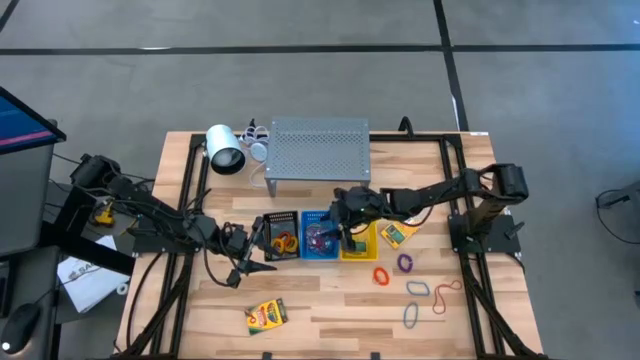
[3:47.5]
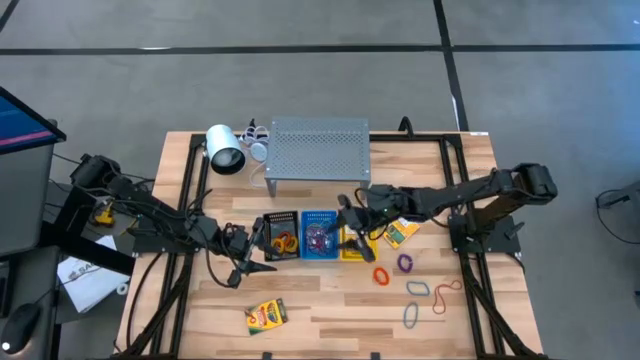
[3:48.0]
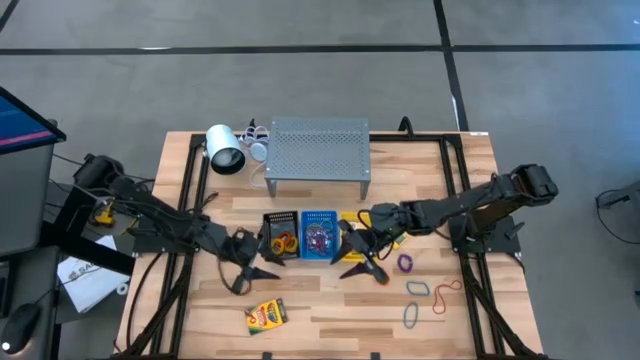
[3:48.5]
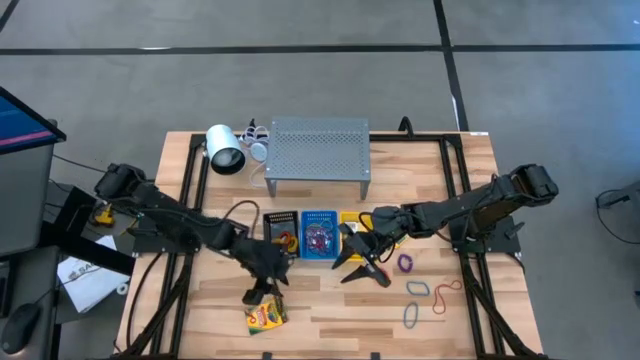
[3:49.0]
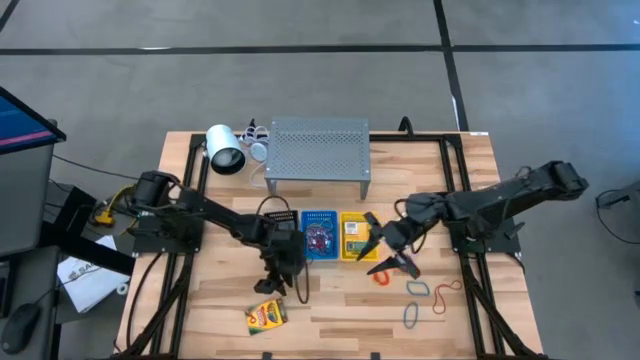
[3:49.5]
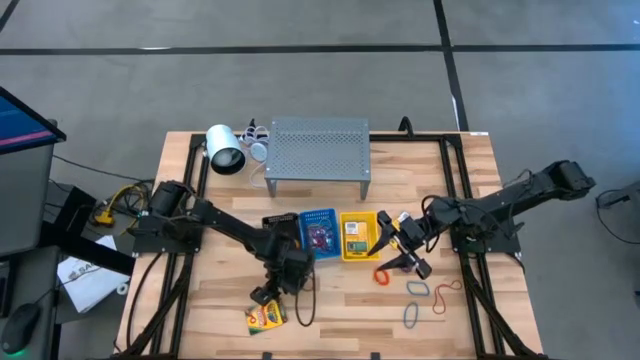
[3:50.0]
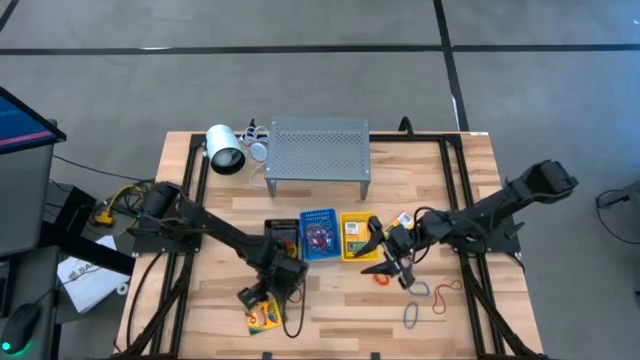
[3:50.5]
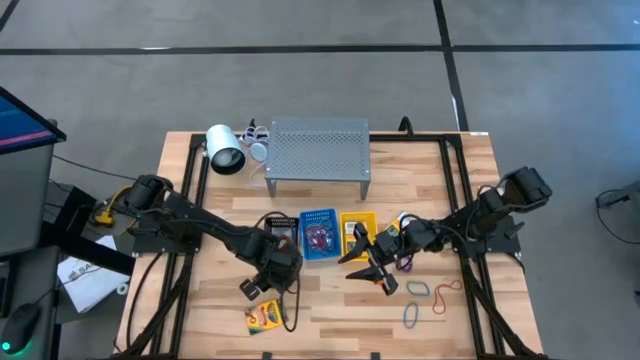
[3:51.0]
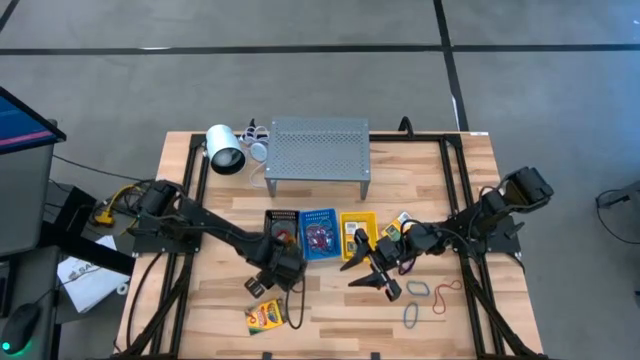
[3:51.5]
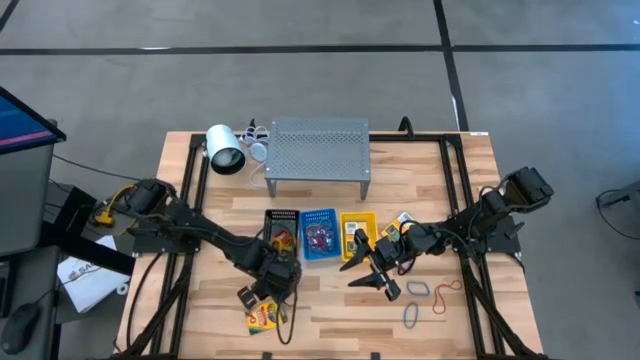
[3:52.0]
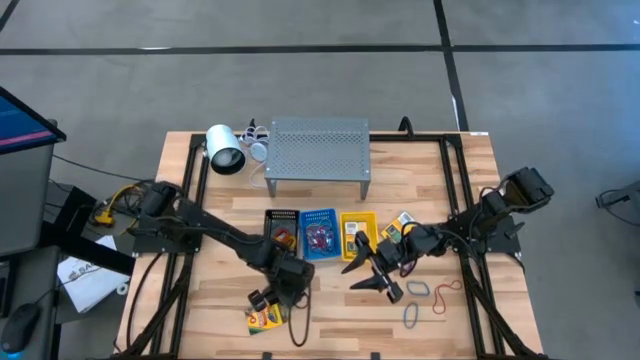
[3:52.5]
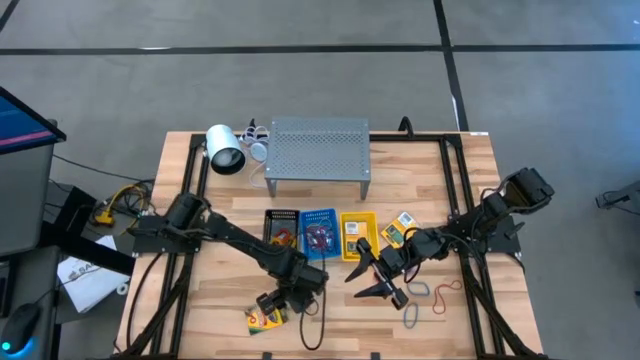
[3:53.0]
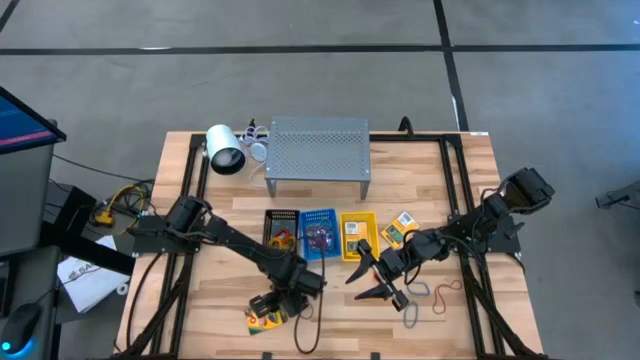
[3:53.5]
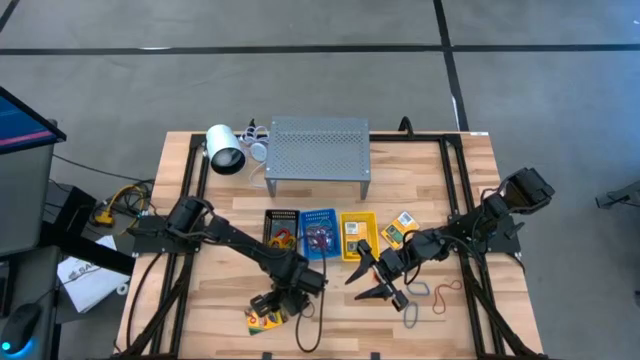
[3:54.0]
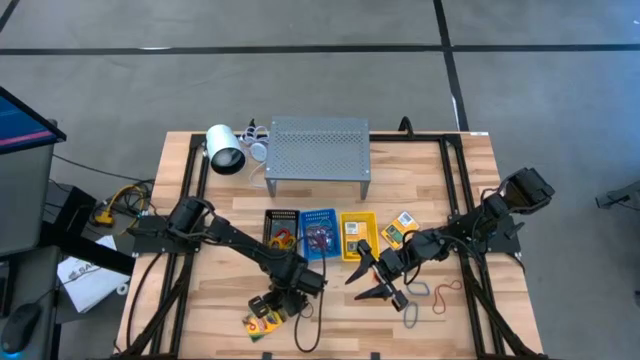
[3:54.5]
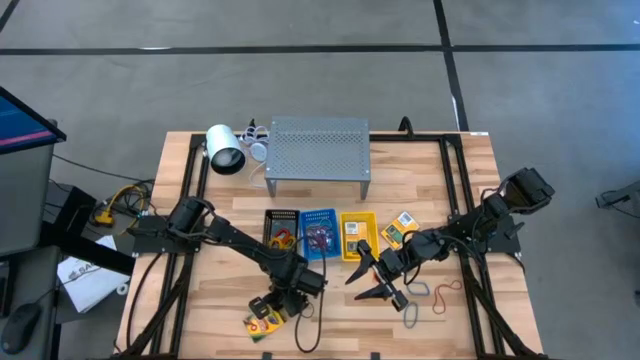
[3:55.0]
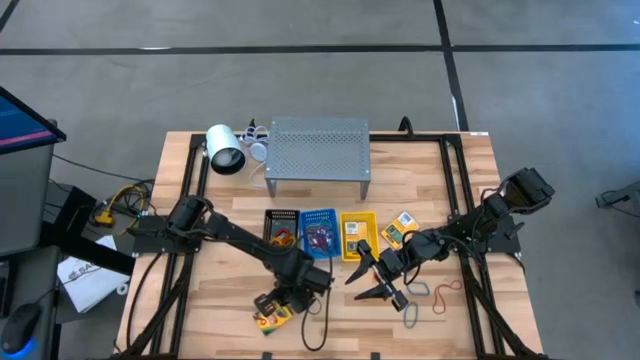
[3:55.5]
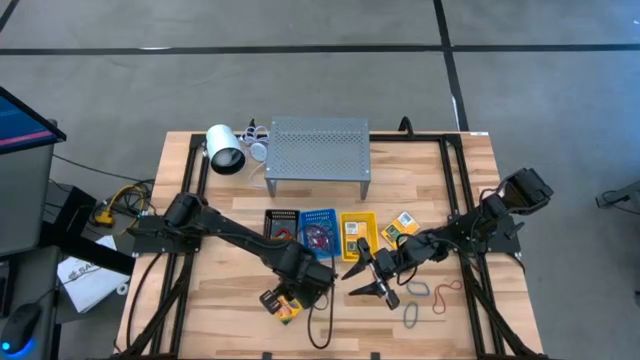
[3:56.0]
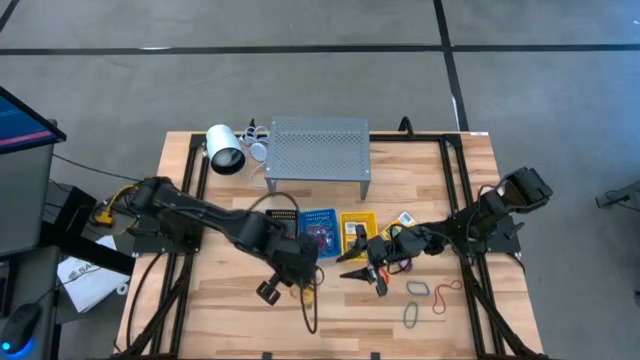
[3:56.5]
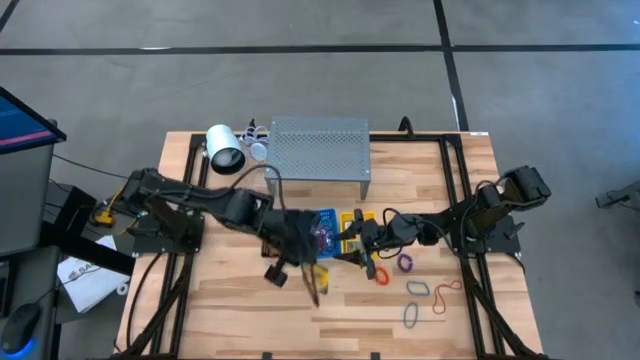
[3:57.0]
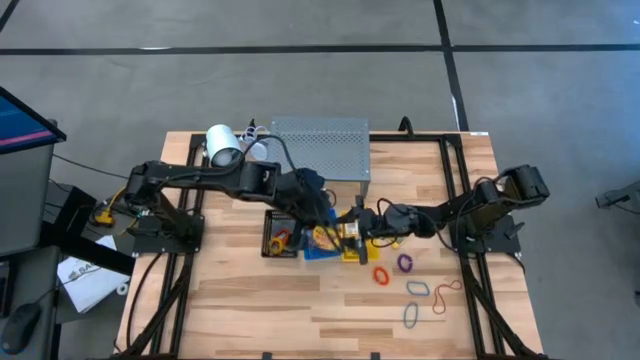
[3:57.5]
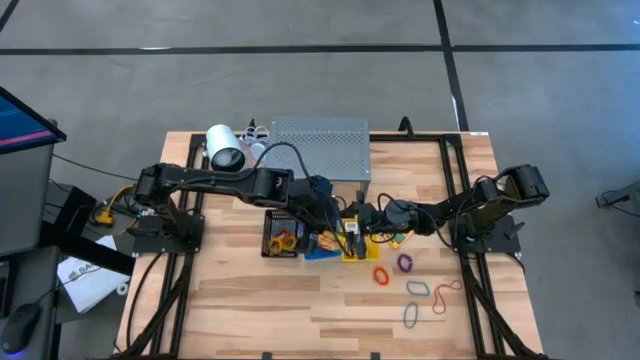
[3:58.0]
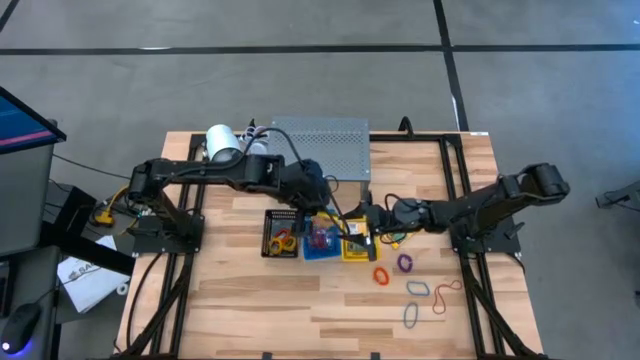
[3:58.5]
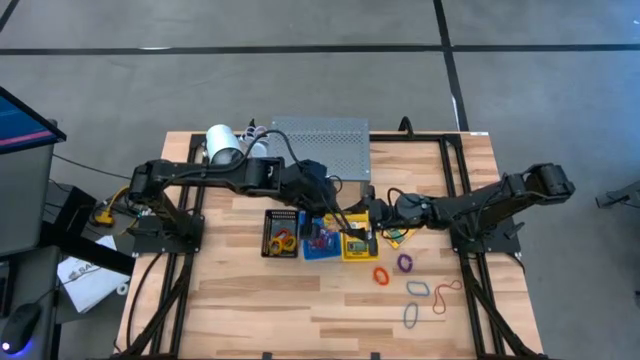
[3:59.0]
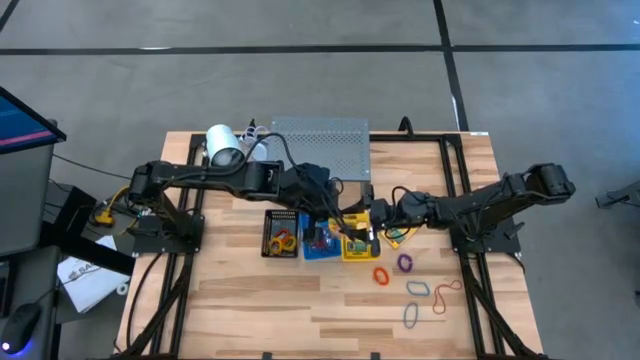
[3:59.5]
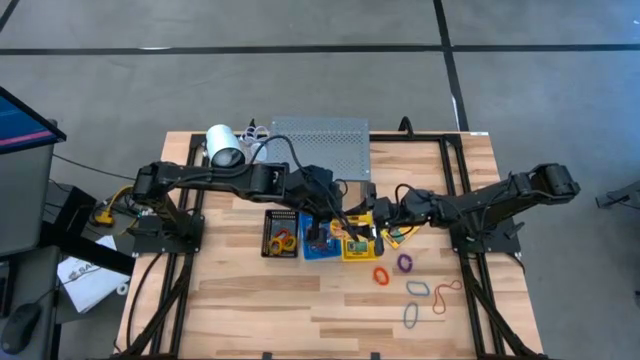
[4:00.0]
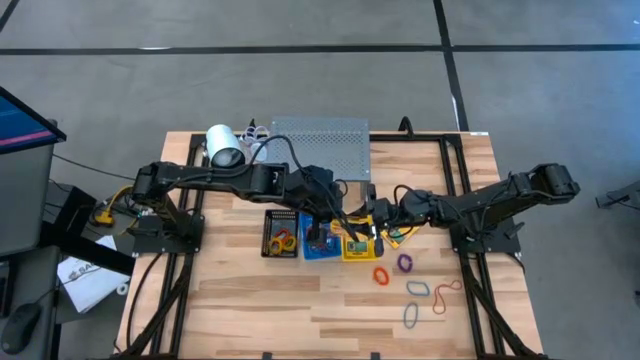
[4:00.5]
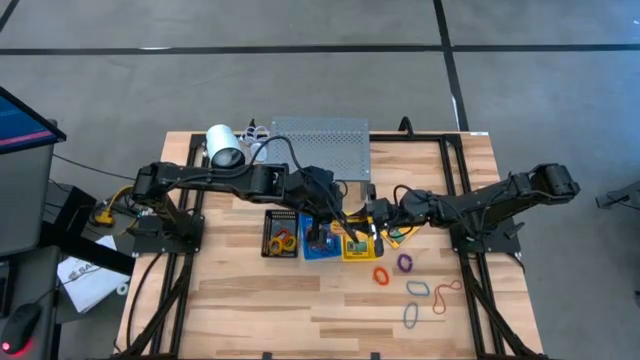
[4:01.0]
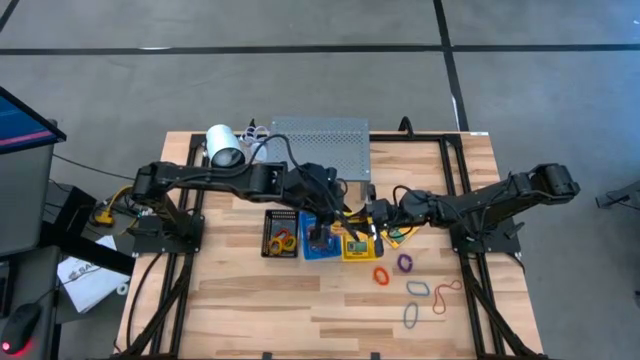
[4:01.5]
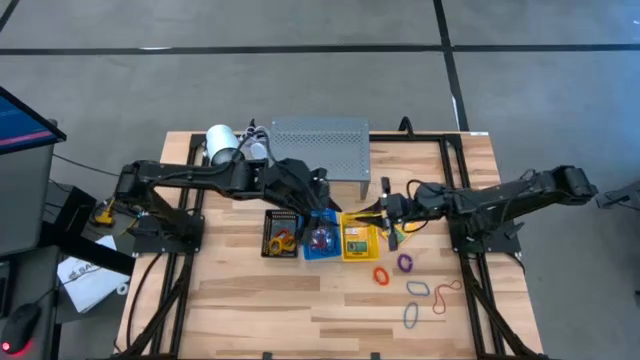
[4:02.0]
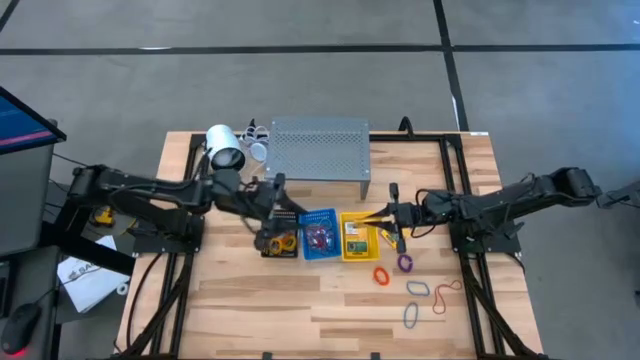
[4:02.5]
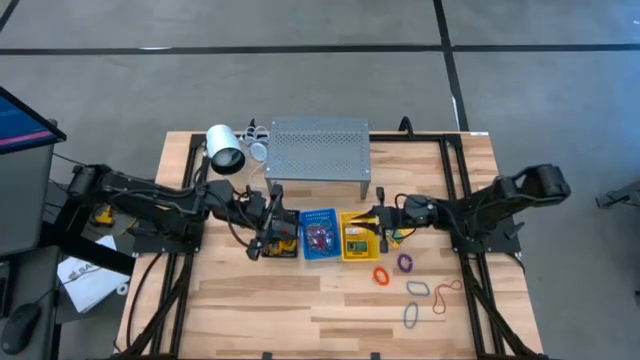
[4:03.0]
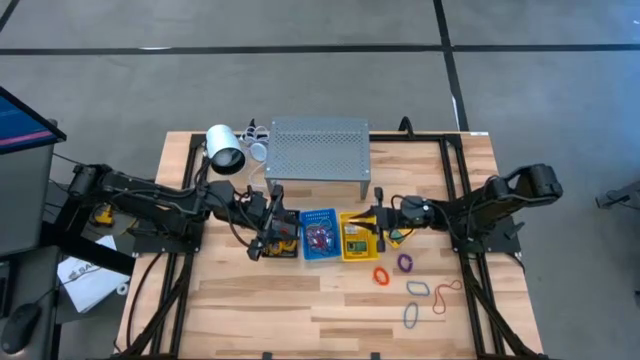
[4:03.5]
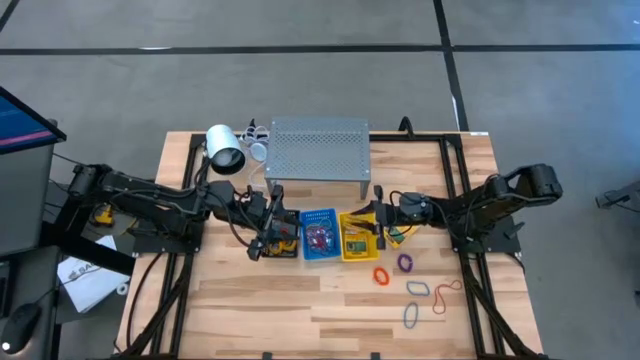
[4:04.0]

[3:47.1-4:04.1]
Task: Pick & Place Office Desk Supplies
Put the yellow crayon box into the yellow basket

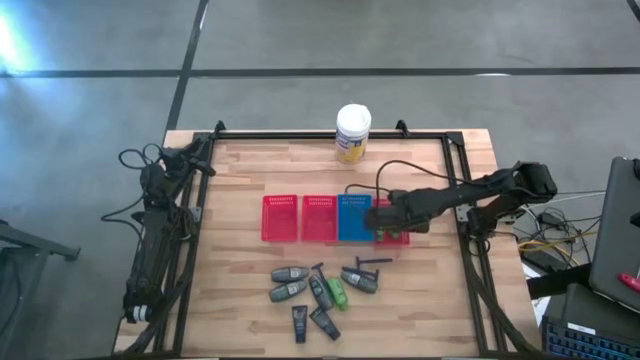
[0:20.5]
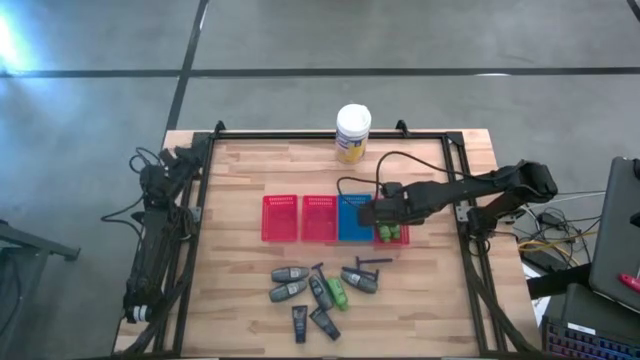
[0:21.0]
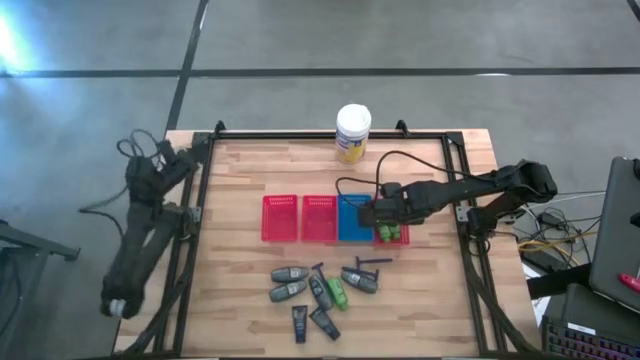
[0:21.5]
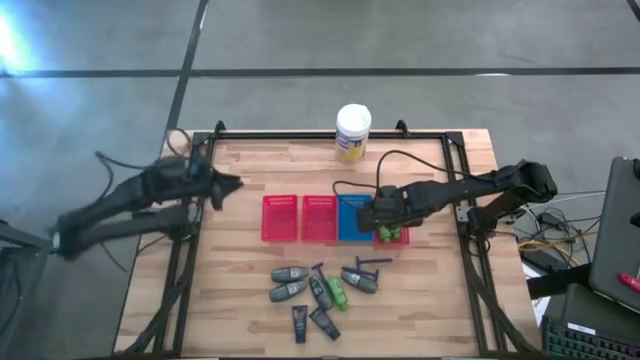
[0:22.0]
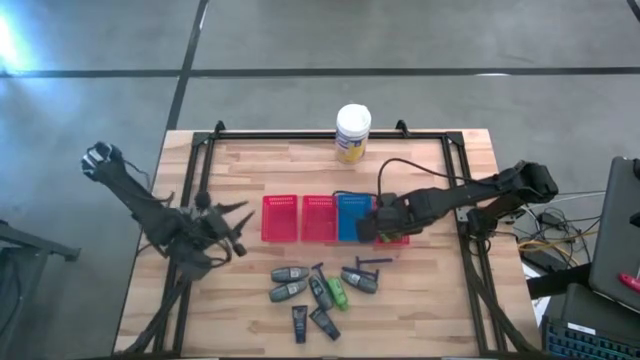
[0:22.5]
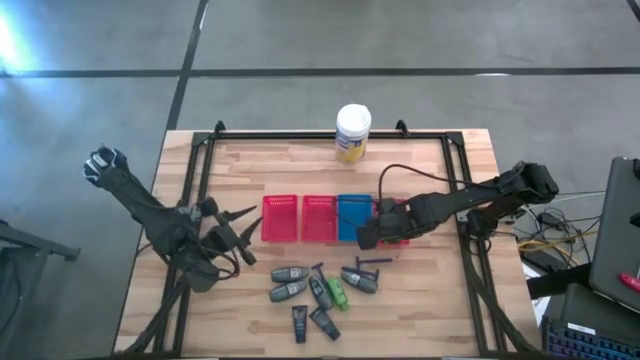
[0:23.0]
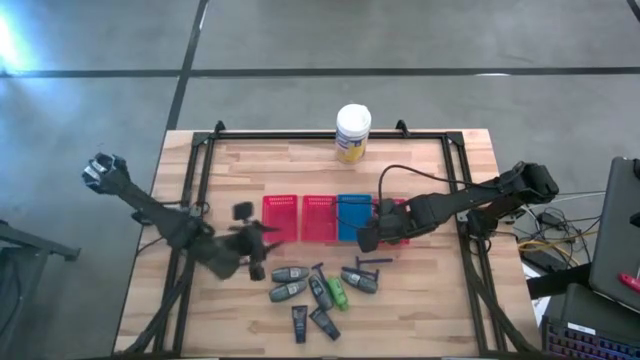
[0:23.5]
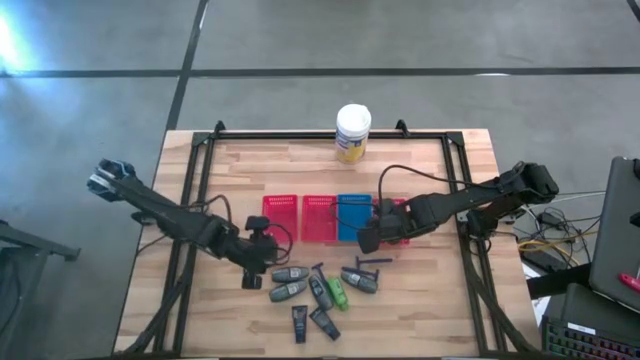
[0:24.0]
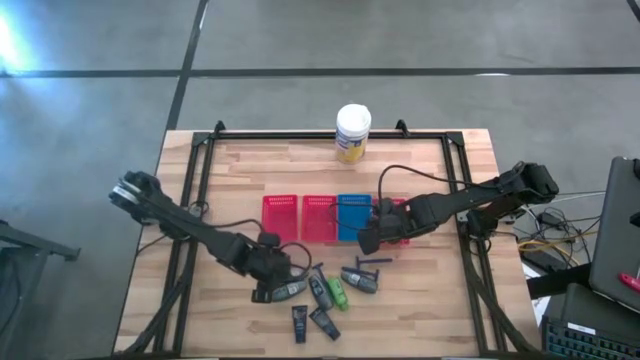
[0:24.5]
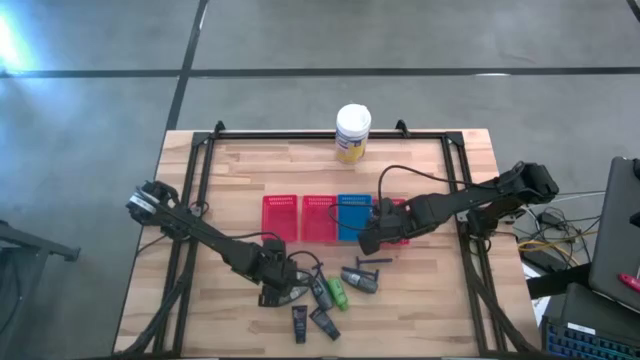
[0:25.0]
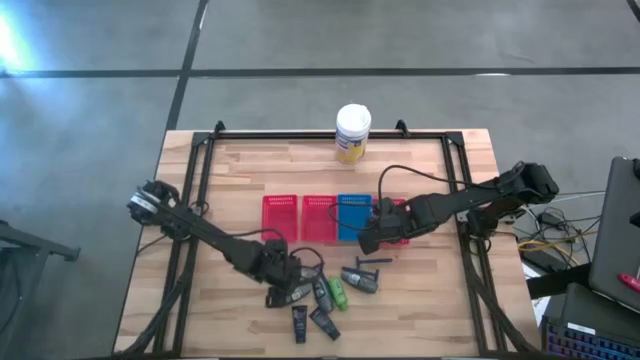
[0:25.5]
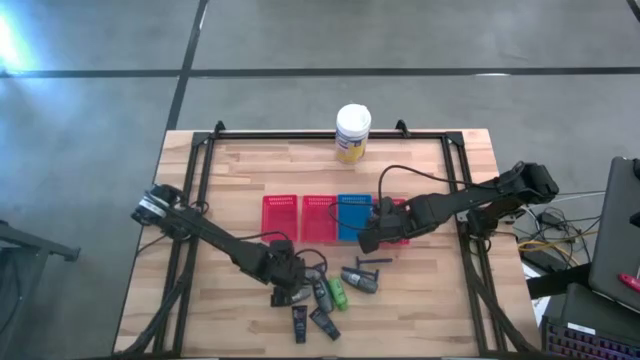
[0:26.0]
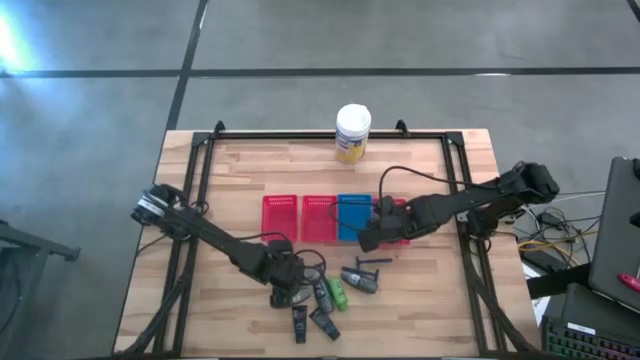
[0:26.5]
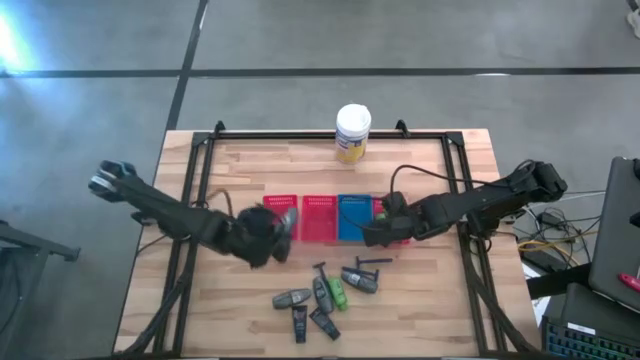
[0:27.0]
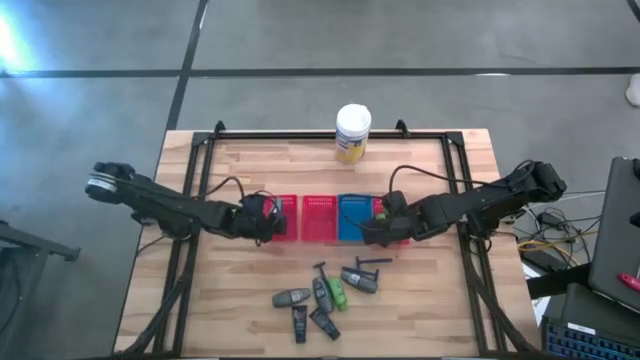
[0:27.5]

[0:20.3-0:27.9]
Task: Pick & Place Travel size toiletries
Put the gray deodorant into the left red bin
